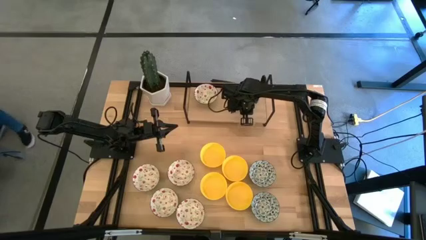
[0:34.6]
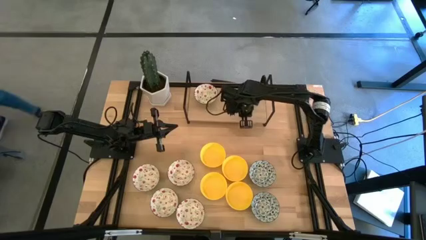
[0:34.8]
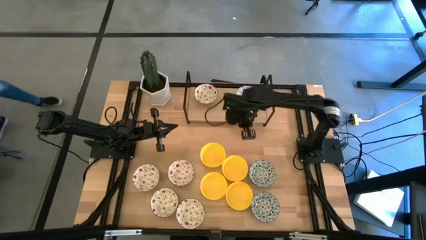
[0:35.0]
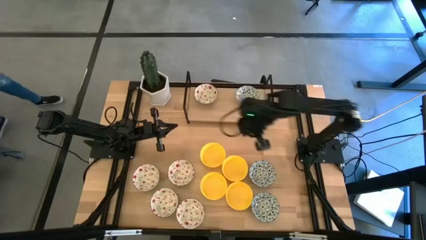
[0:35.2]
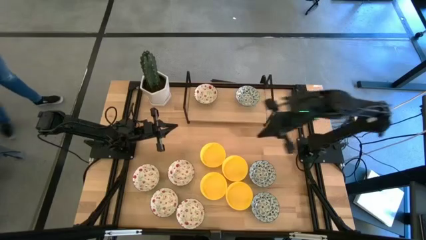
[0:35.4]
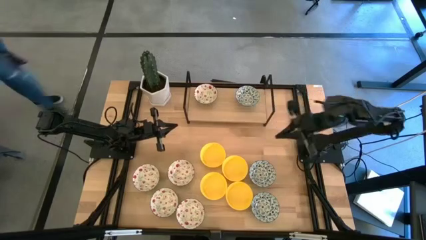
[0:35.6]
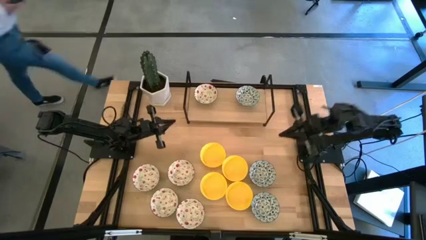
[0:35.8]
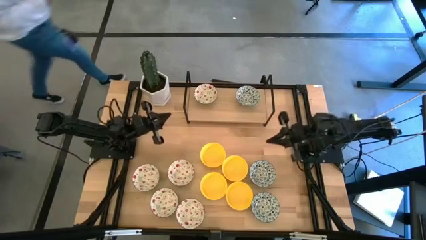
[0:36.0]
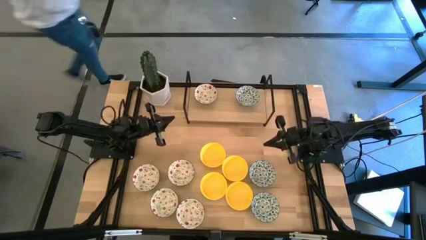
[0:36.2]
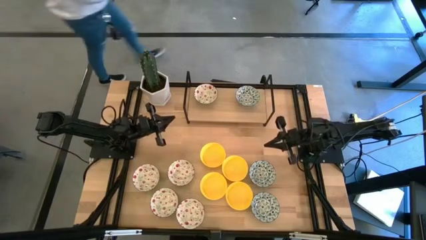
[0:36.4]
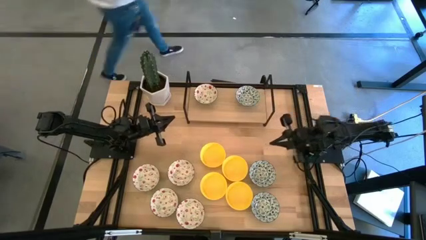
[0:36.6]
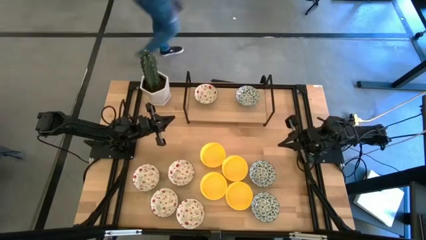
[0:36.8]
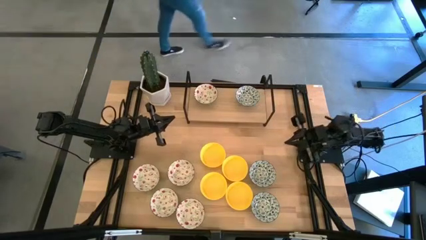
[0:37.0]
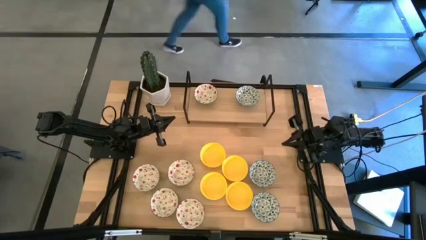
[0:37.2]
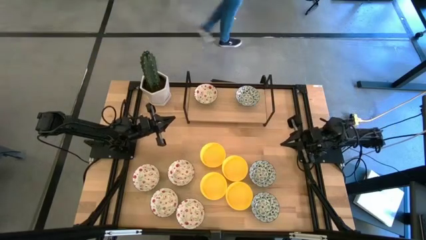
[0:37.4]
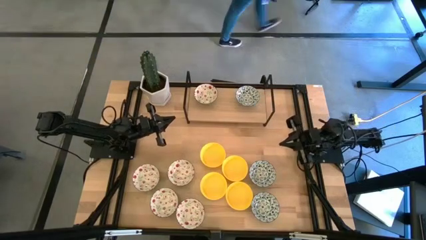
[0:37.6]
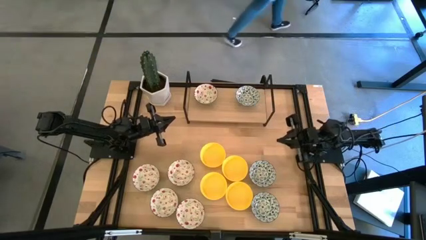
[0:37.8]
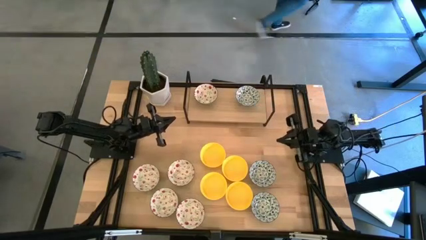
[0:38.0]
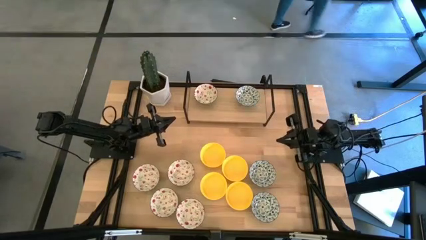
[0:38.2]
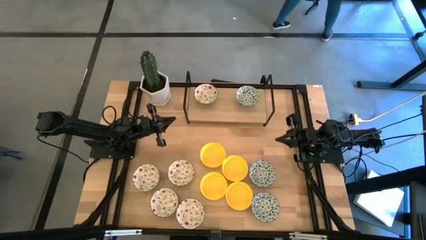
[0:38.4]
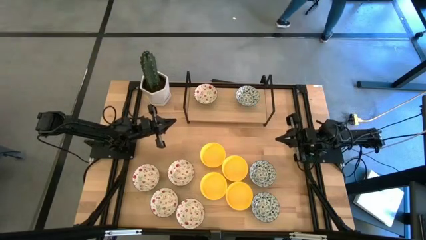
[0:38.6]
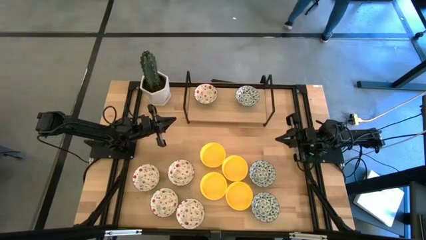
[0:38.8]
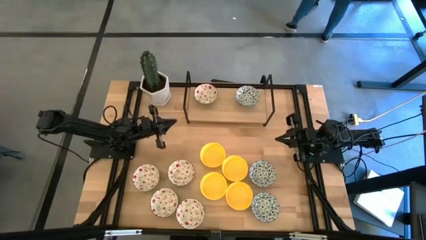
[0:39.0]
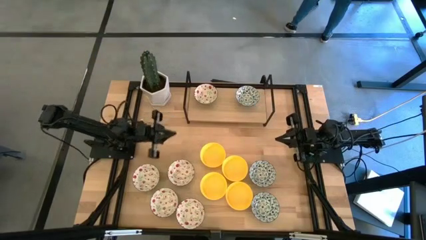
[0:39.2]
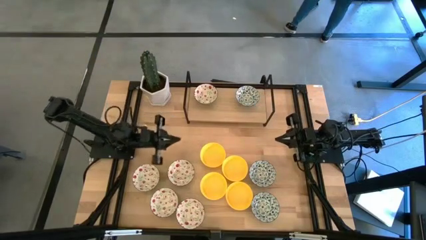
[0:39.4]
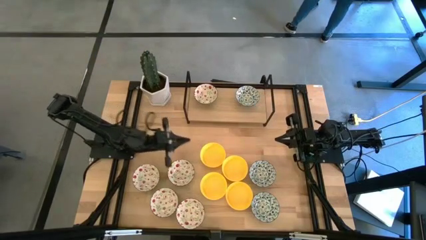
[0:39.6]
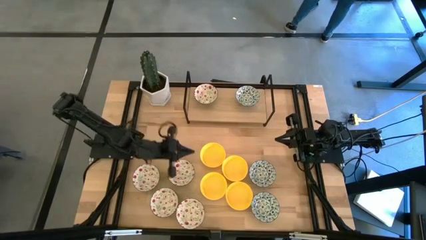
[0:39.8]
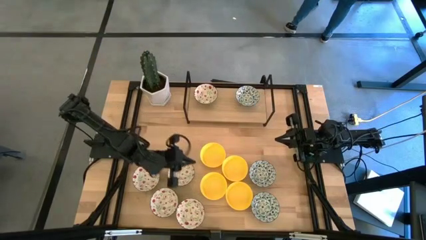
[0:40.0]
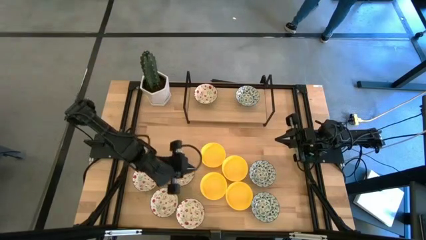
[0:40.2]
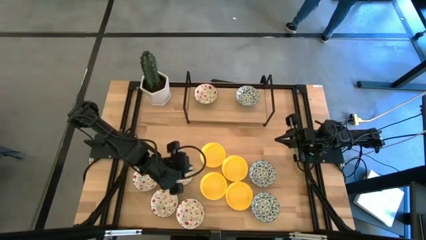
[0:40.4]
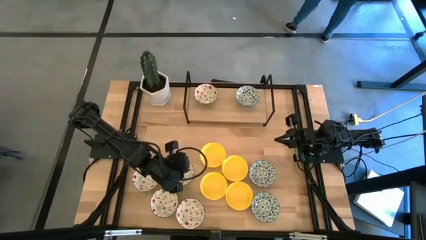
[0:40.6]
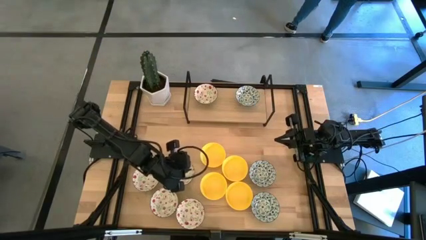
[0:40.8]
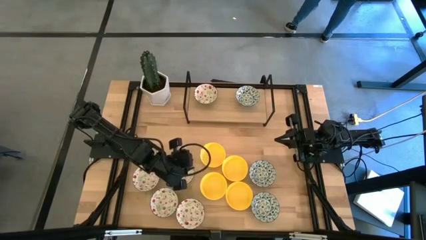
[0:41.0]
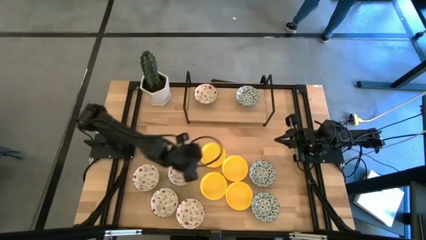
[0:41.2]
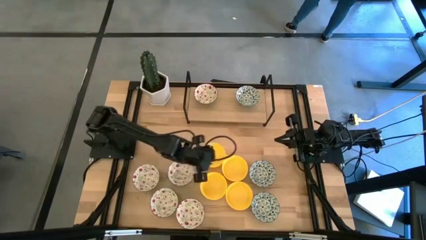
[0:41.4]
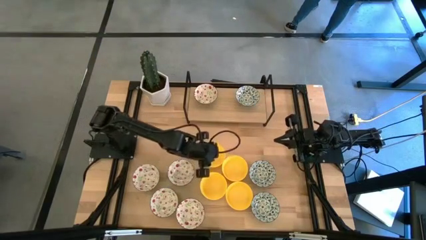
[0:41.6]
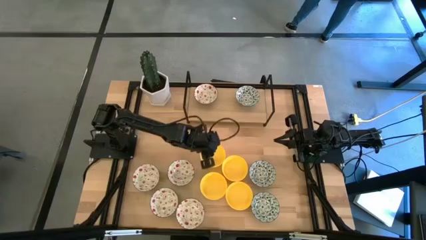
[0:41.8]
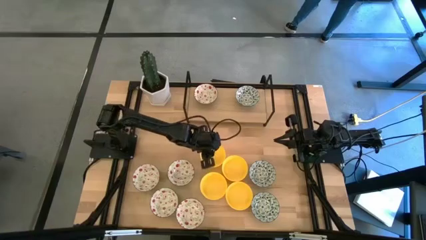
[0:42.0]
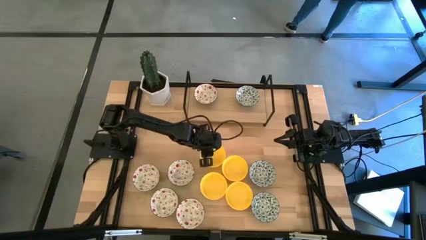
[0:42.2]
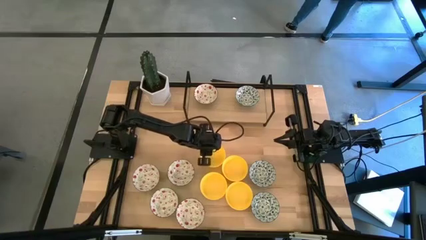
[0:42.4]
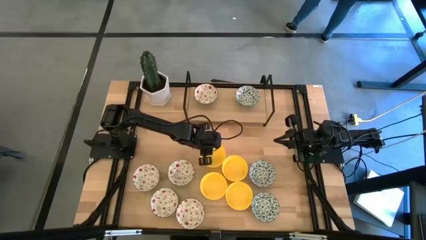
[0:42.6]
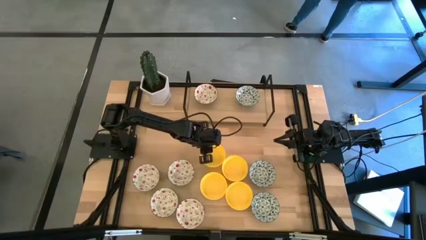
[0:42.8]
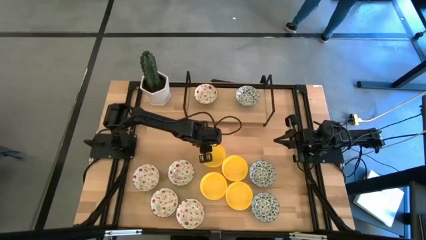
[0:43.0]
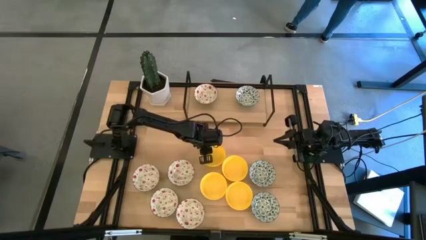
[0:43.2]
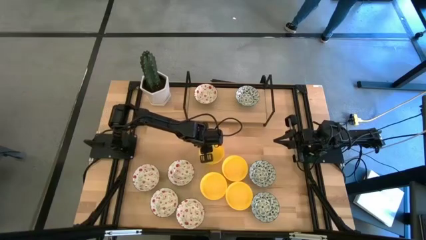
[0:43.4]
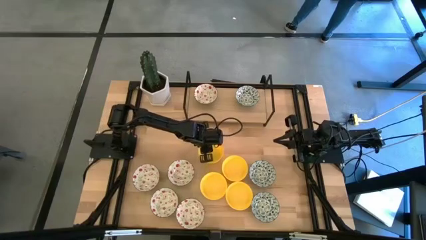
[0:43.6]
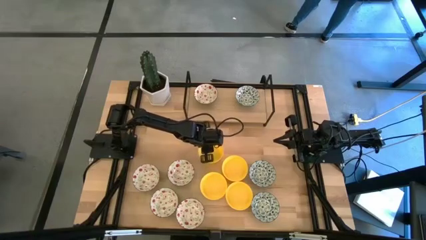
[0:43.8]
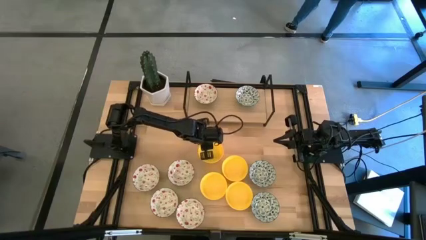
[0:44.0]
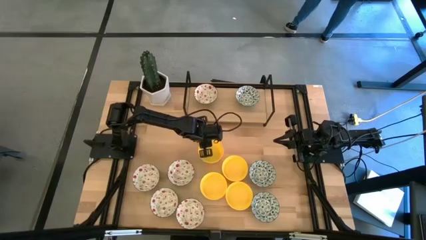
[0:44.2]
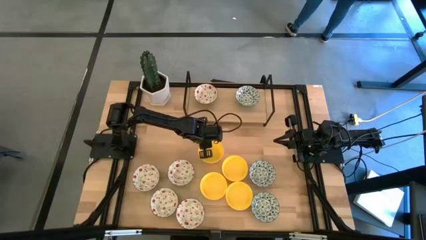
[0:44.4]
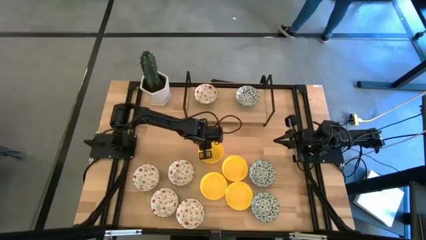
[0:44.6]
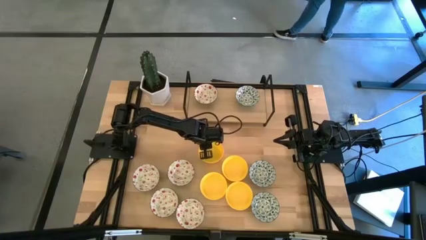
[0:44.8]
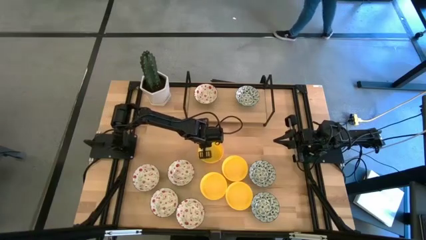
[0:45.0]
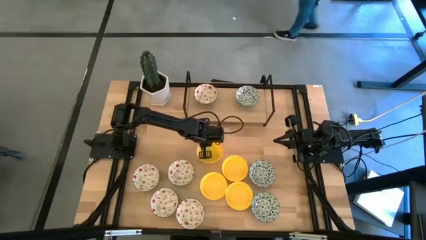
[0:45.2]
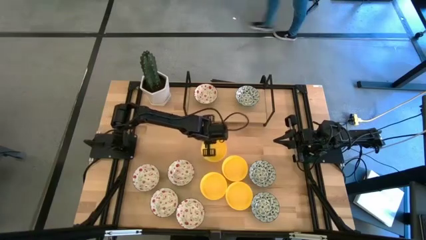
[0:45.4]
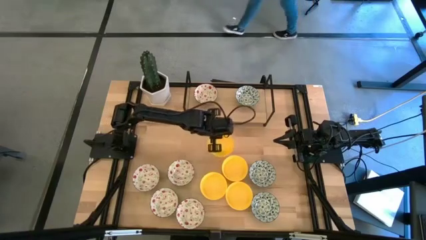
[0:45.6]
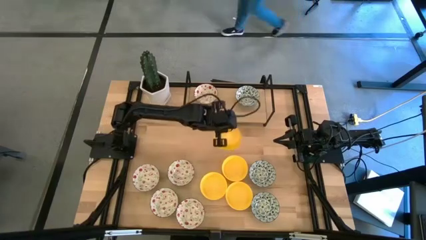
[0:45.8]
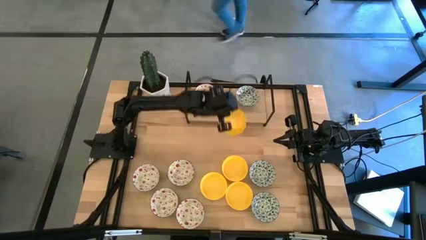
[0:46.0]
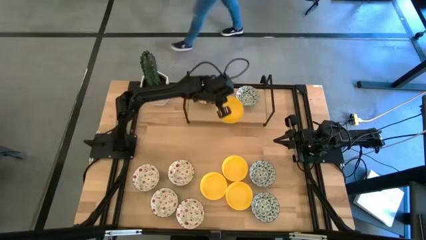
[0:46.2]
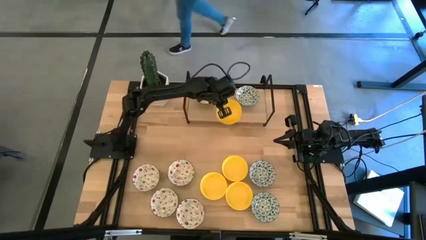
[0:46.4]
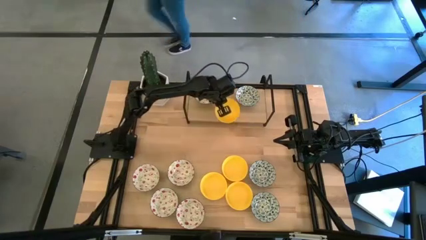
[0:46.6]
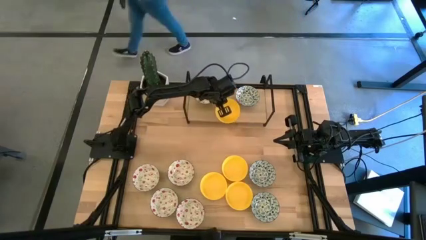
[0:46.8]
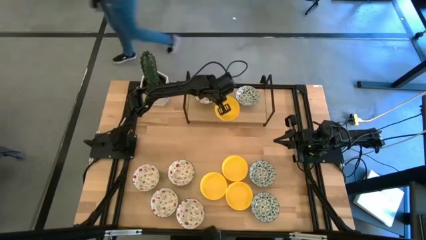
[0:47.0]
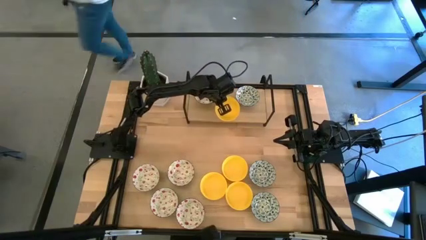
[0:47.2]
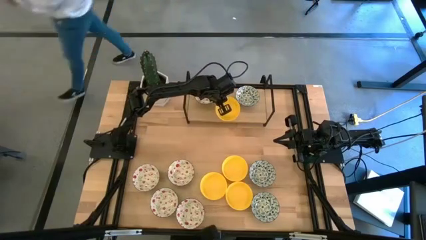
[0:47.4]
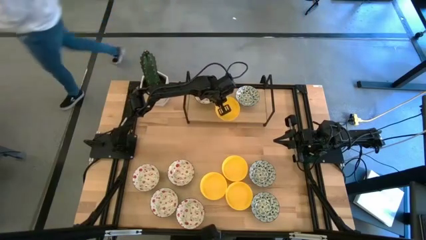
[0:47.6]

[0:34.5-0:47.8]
Task: Pick & Place Mini bowls
Put the top left yellow bowl on the shelf

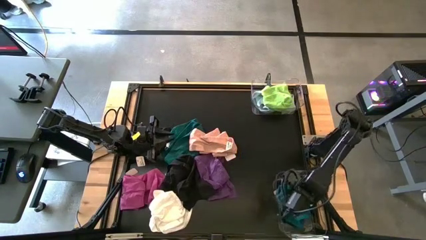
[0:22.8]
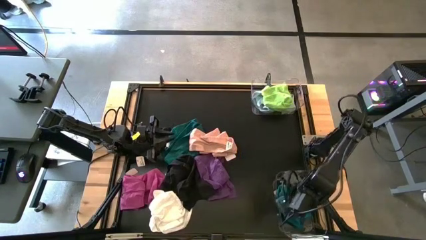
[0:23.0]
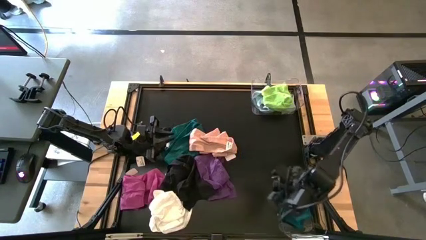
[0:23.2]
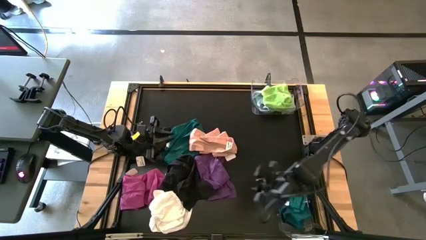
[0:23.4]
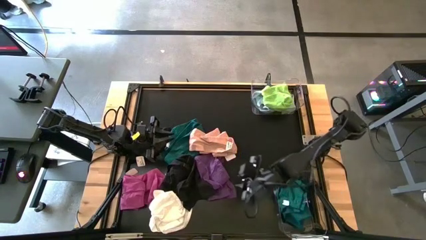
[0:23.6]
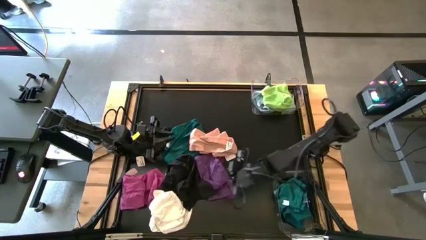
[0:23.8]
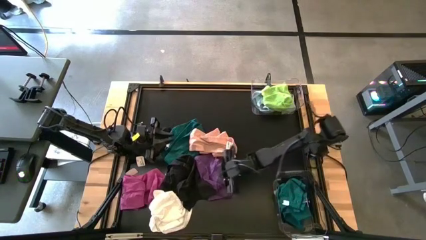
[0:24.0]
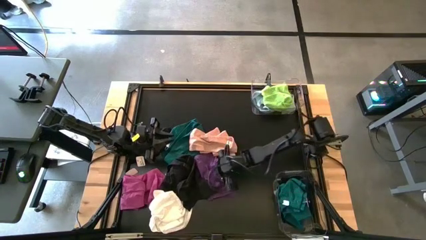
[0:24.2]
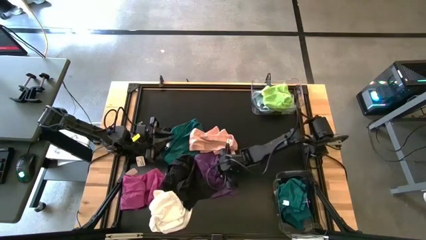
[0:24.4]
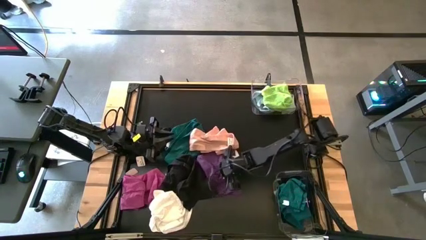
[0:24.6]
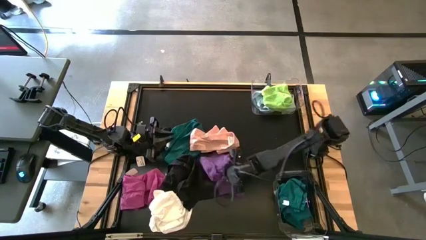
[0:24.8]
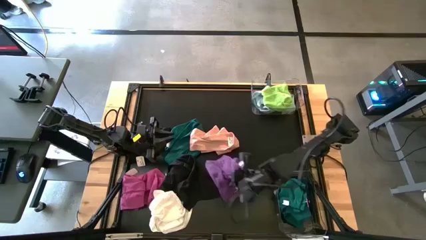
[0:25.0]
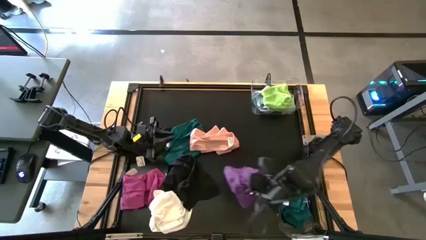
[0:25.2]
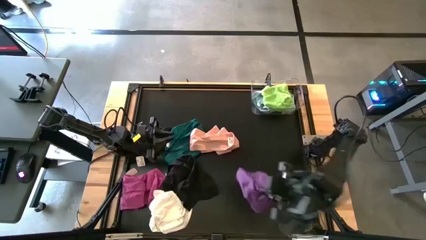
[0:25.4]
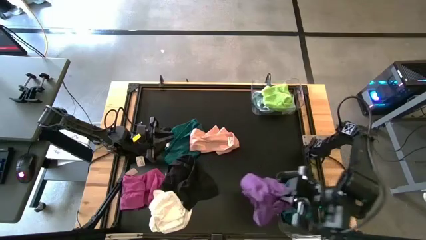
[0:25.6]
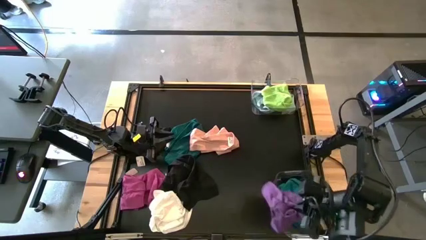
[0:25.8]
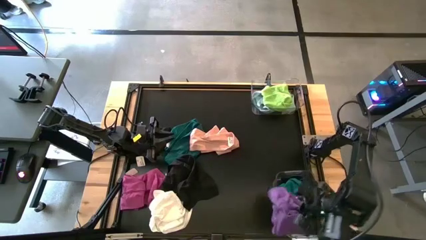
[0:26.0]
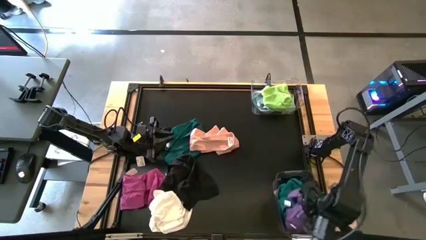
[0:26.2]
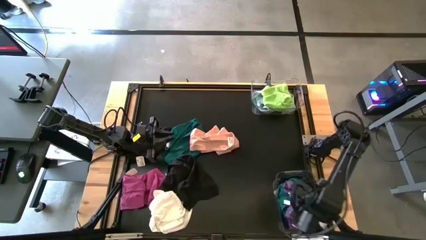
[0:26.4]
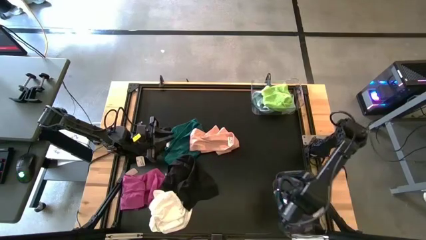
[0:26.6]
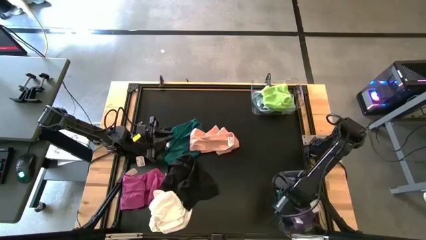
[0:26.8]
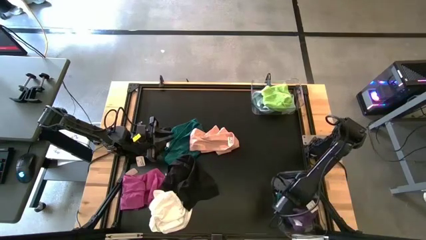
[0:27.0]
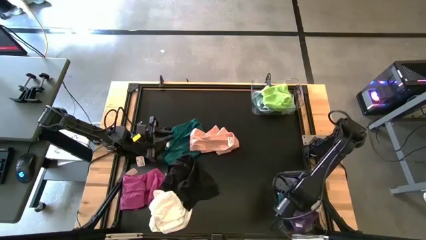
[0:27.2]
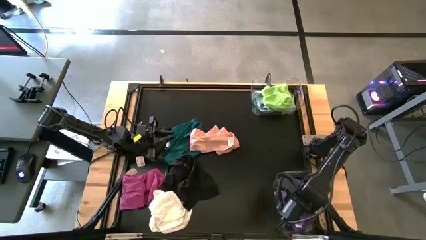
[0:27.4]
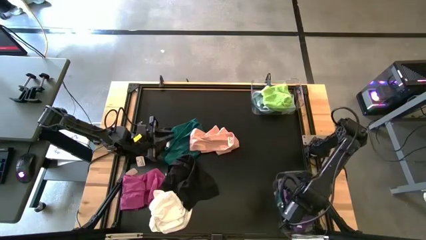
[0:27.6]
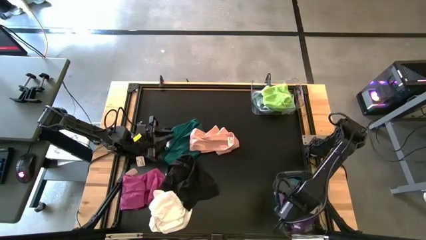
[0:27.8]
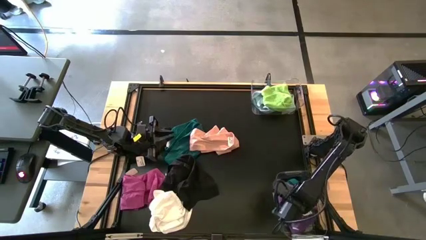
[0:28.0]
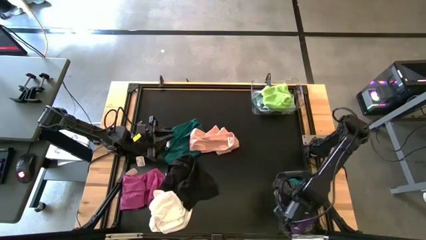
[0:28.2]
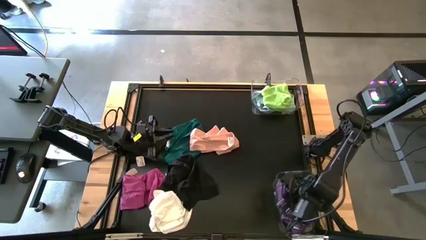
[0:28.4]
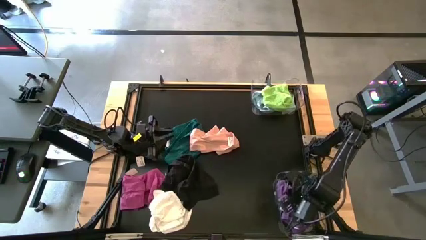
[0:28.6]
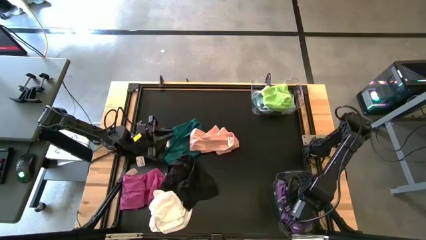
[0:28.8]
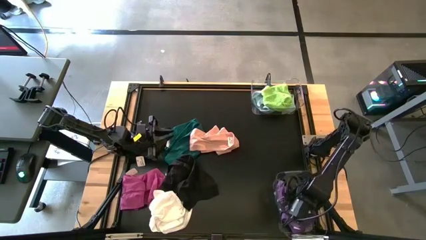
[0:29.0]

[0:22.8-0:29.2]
Task: Sort towels by color in basket
Put the violet towel into the bottom transparent bin
